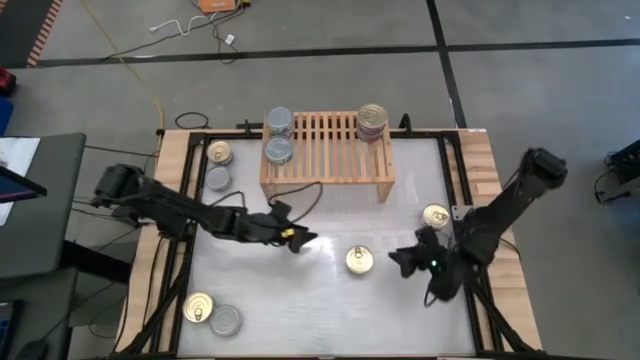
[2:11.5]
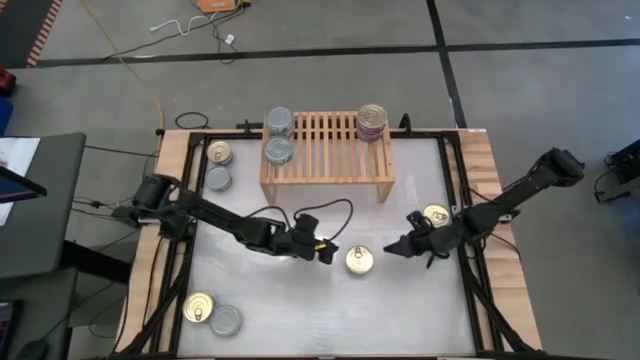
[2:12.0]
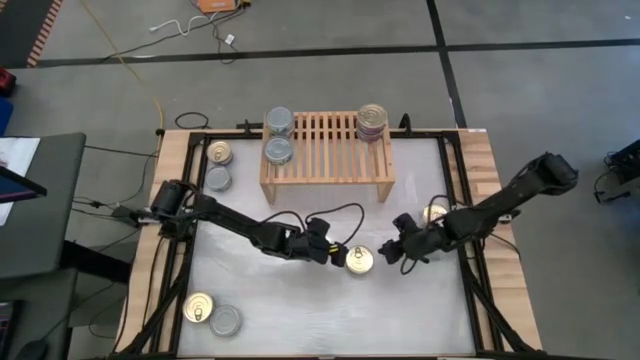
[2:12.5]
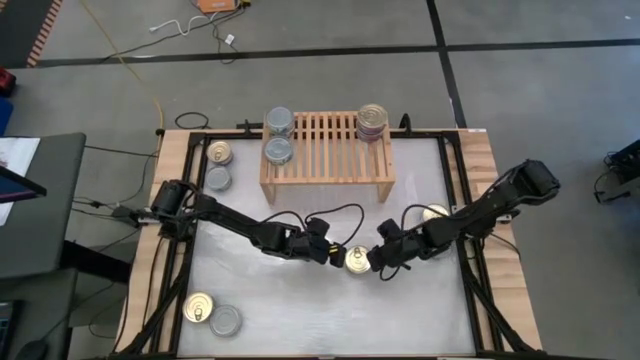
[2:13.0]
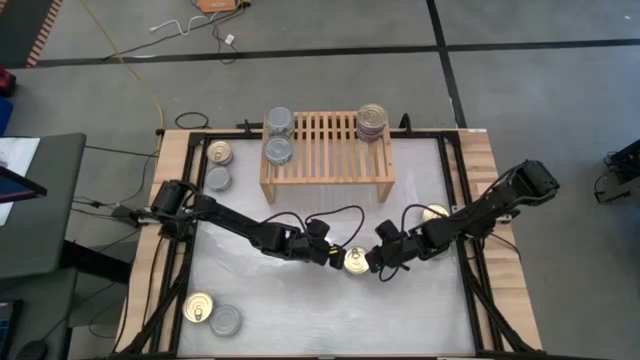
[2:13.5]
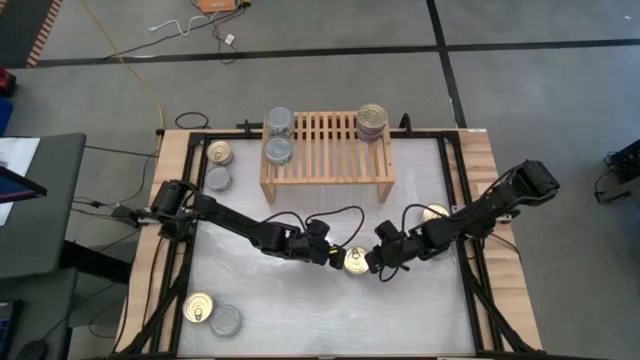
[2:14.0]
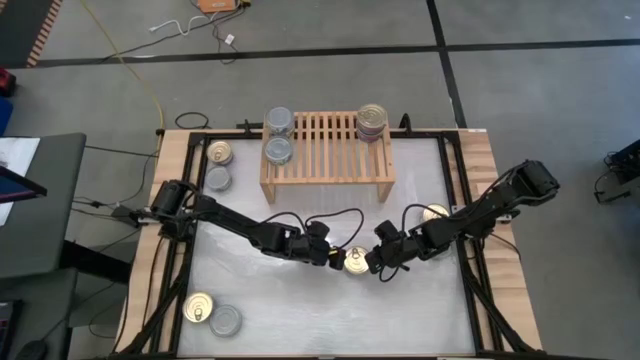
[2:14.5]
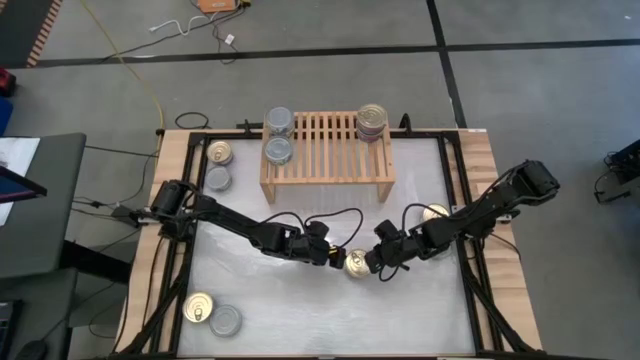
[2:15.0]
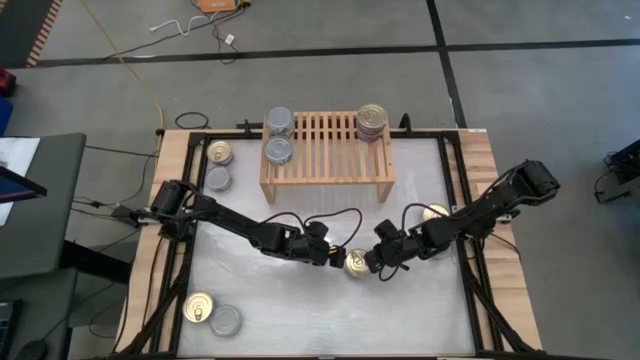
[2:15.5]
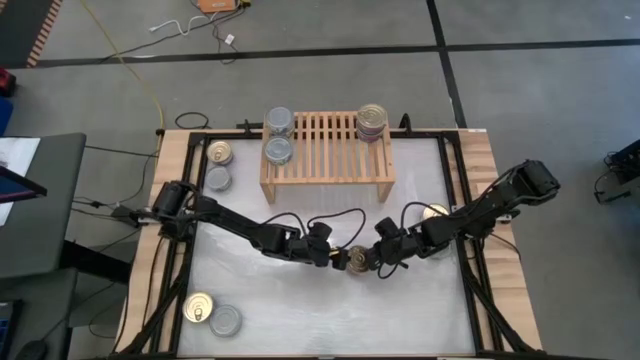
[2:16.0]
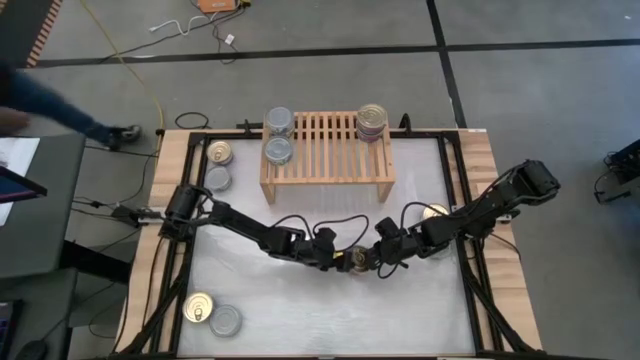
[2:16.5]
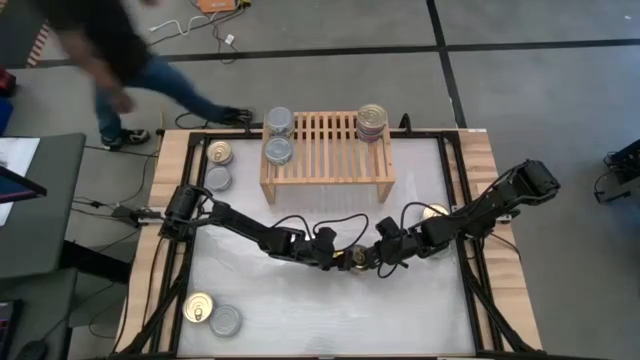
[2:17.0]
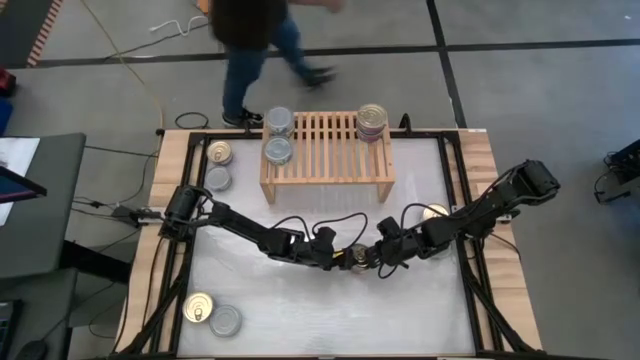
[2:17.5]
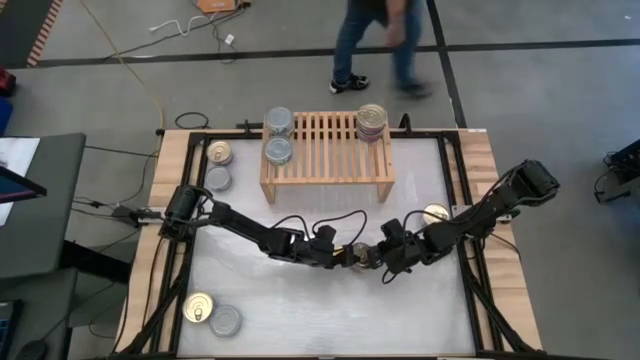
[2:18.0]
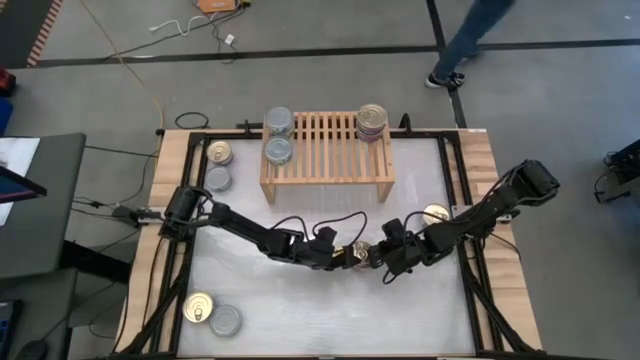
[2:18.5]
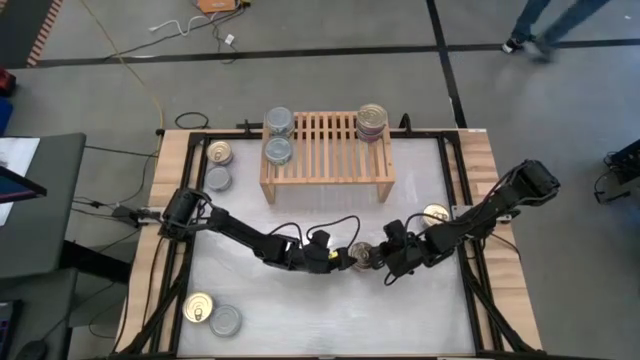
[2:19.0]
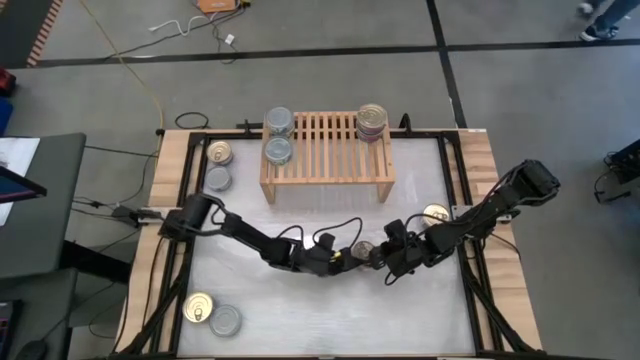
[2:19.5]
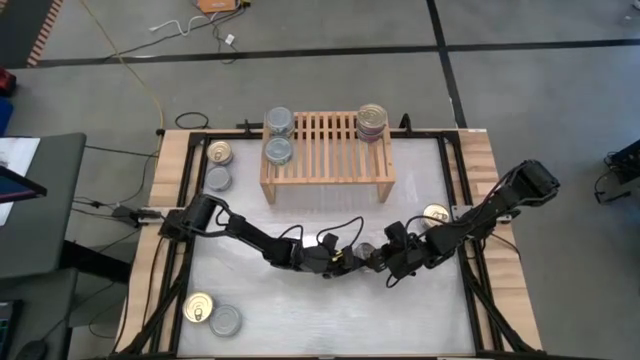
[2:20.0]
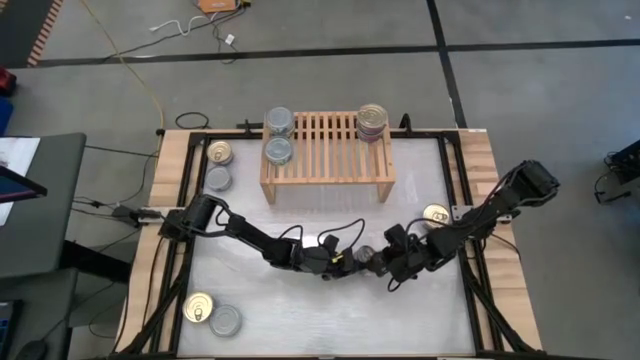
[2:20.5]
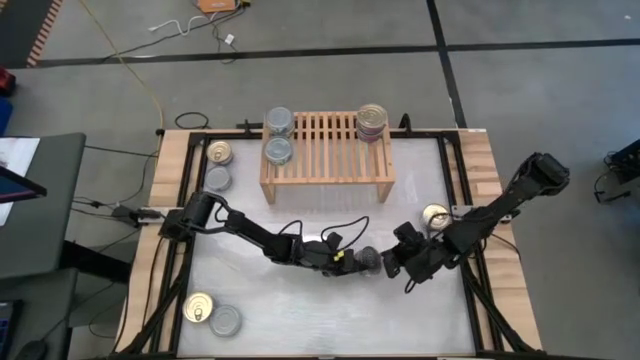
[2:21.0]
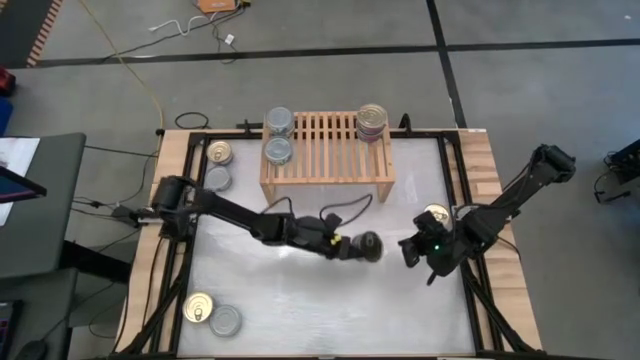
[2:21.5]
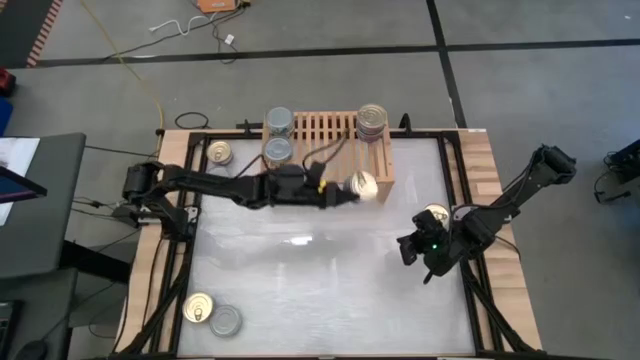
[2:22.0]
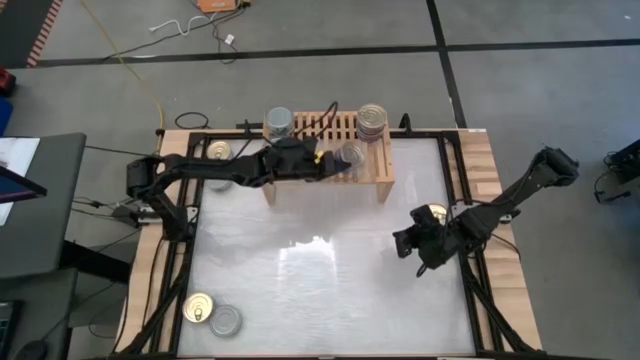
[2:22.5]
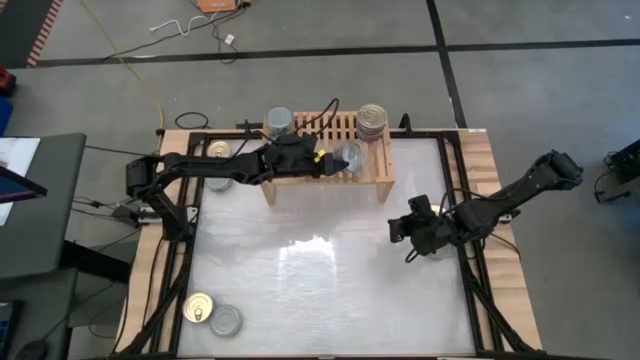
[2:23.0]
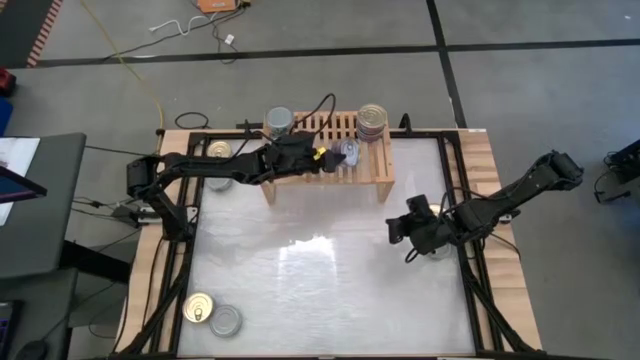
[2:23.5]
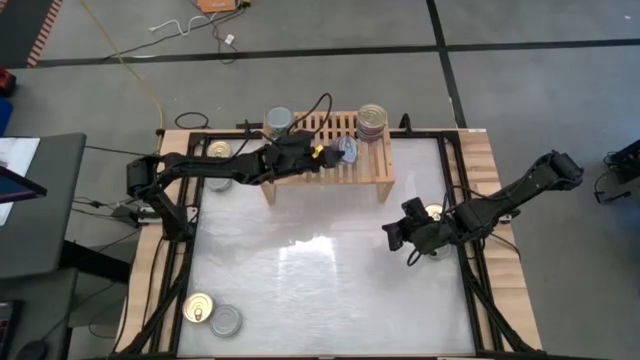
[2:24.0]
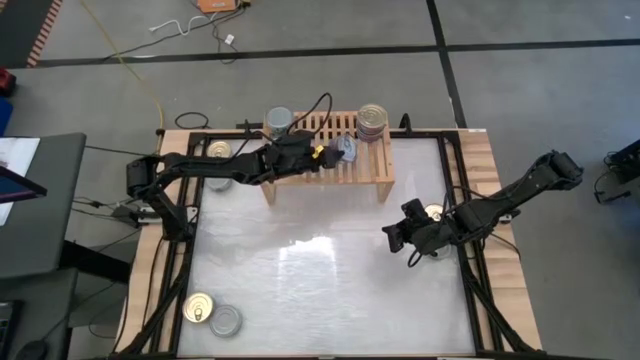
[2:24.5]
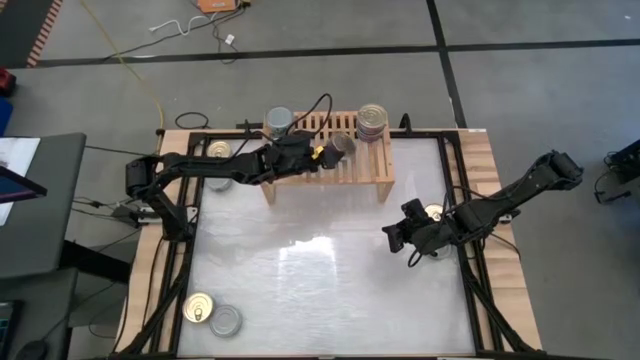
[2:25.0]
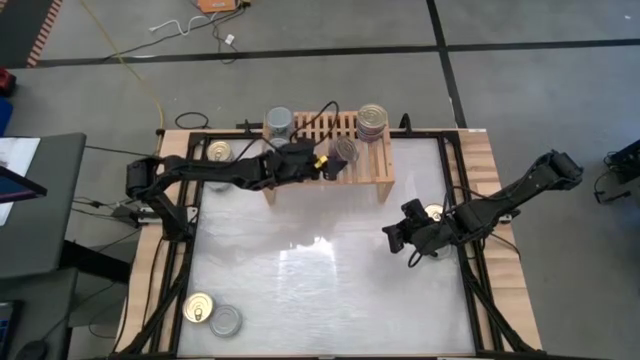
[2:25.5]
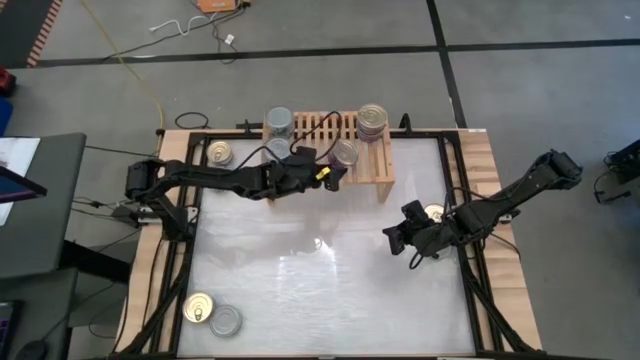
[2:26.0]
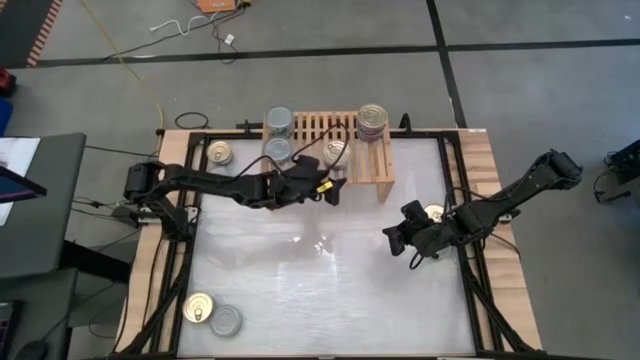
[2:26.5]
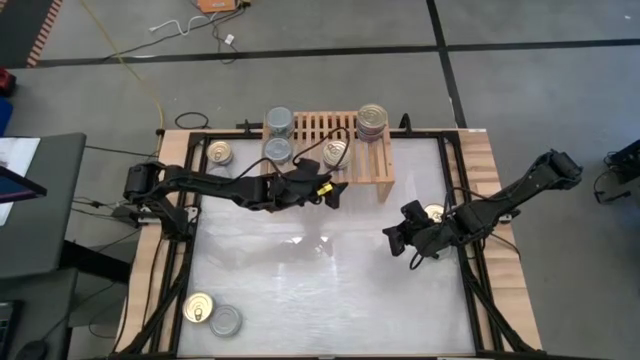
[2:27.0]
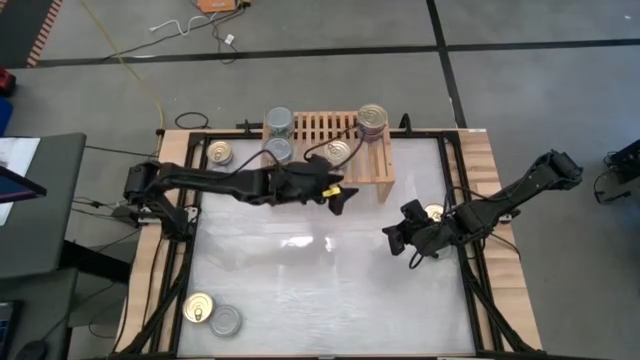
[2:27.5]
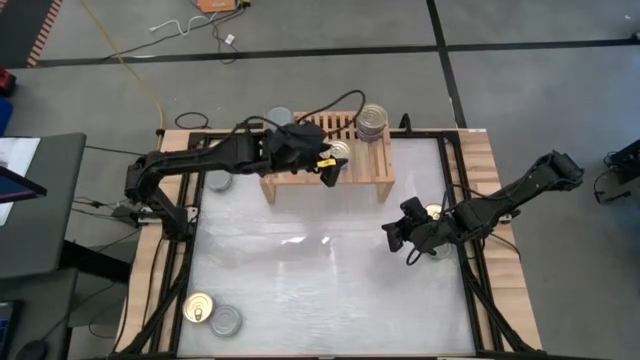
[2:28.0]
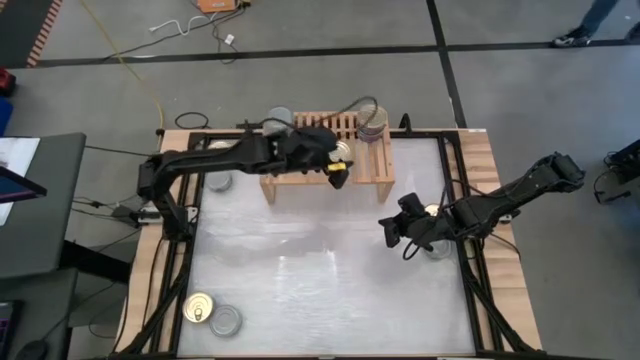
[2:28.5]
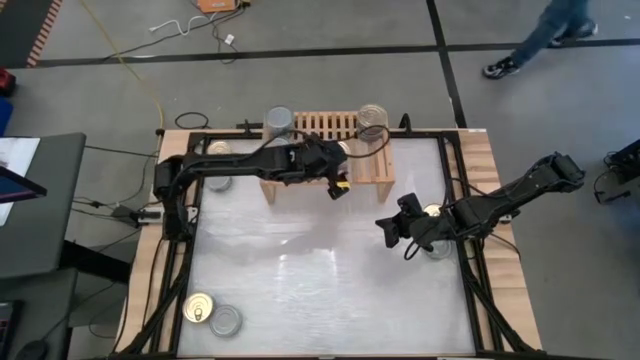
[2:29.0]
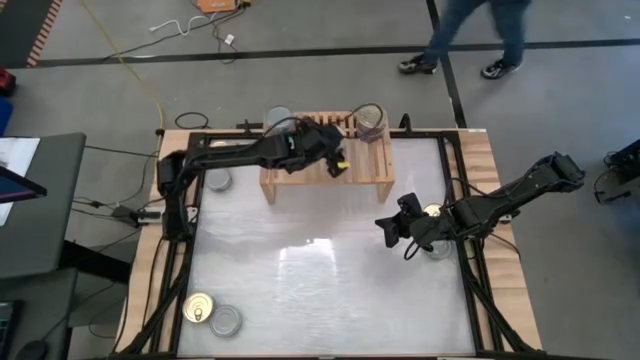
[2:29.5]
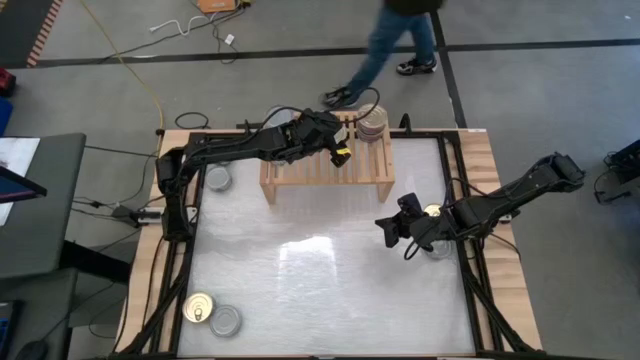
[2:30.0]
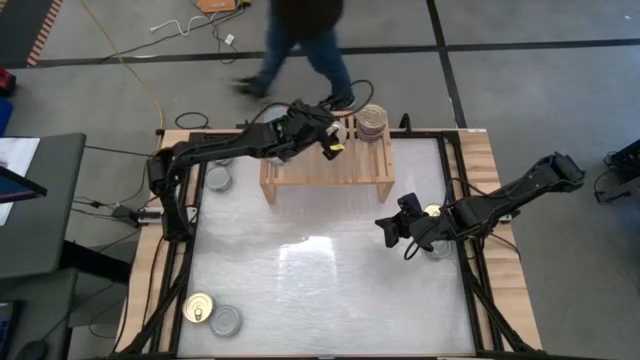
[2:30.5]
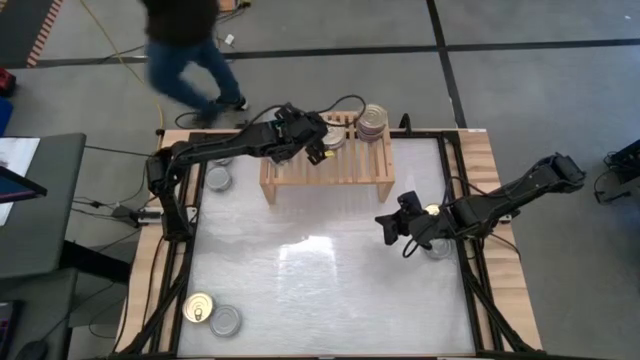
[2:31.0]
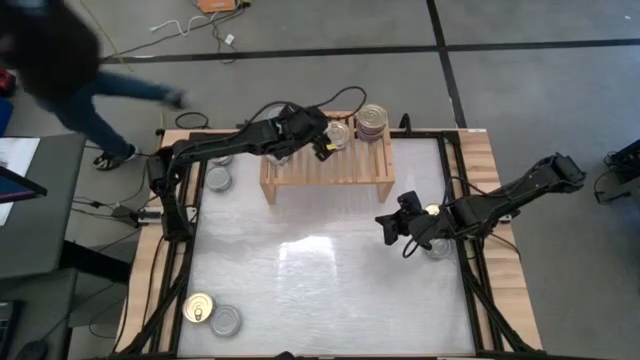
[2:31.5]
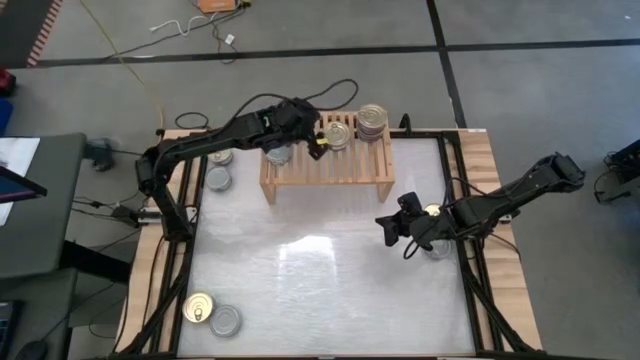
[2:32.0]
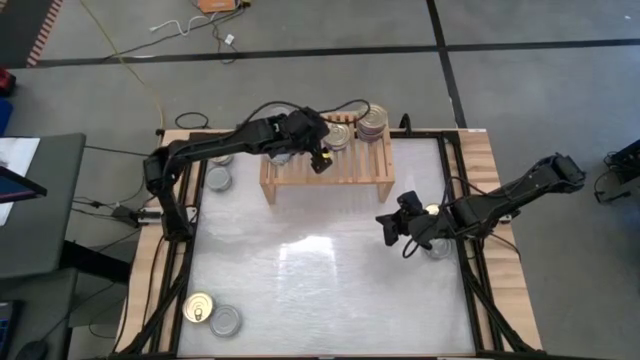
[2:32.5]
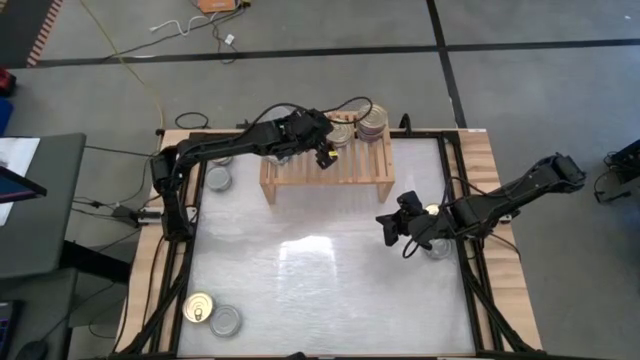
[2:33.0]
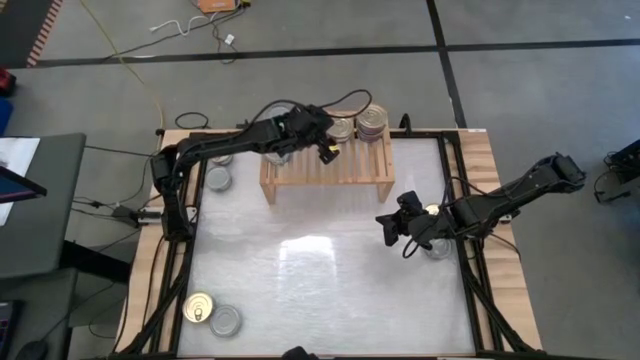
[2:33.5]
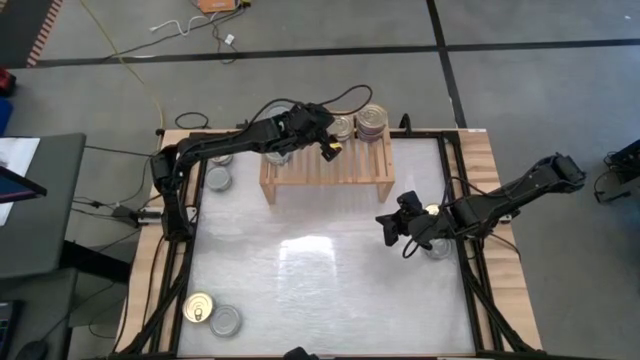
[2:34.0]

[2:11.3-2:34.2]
Task: Stack canned seafood by type on shelf
Put the blue tuna can on the shelf aligned with the other blue tuna can
